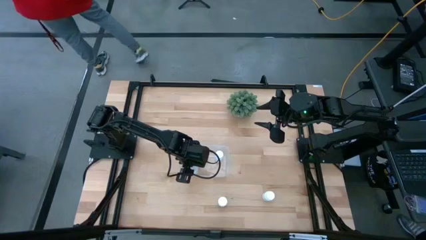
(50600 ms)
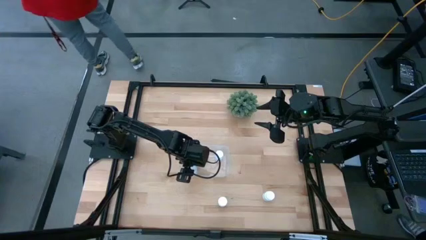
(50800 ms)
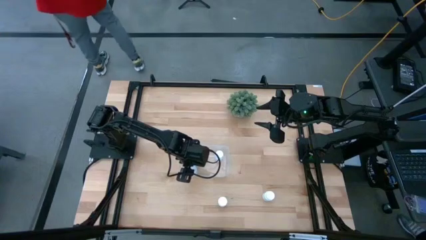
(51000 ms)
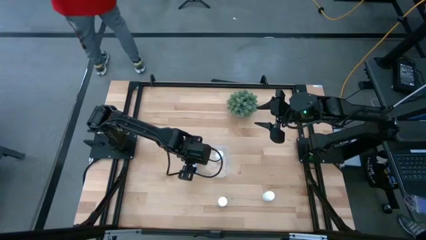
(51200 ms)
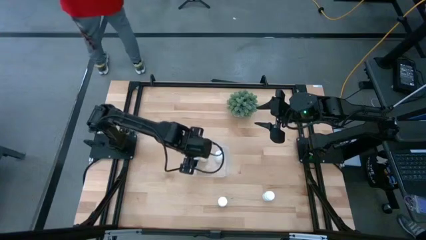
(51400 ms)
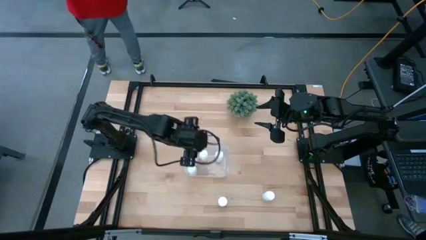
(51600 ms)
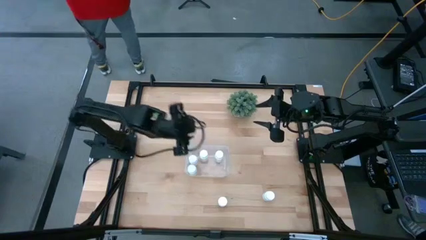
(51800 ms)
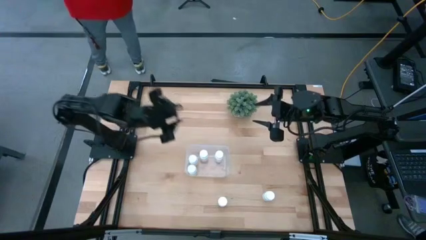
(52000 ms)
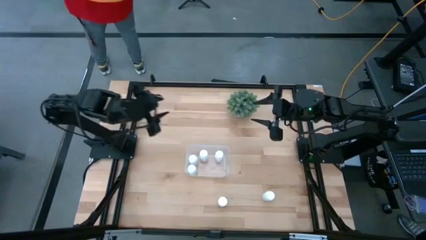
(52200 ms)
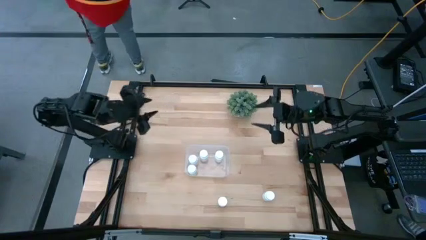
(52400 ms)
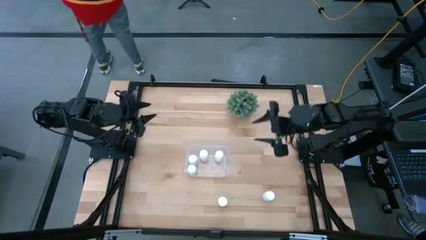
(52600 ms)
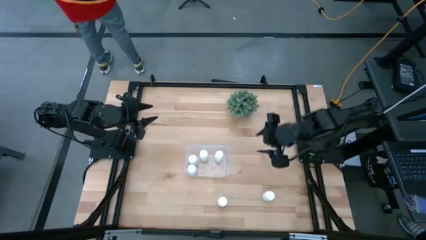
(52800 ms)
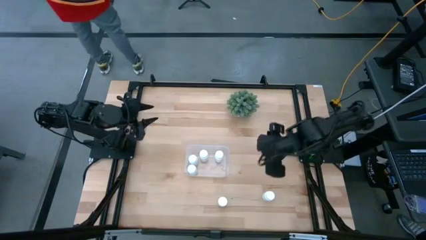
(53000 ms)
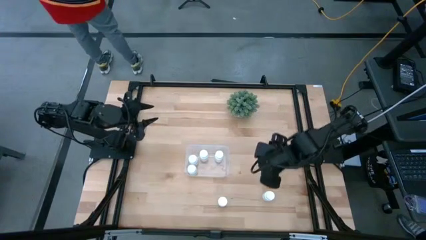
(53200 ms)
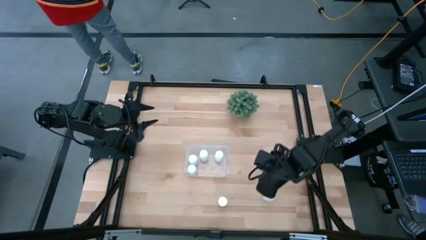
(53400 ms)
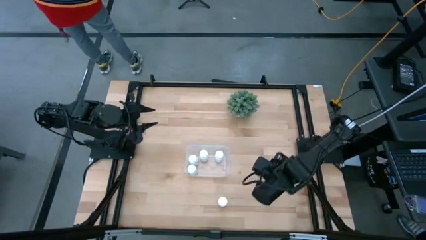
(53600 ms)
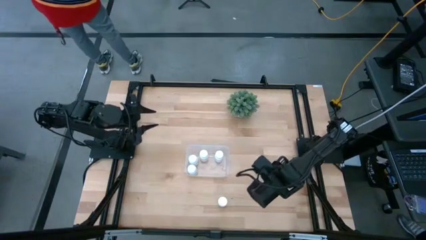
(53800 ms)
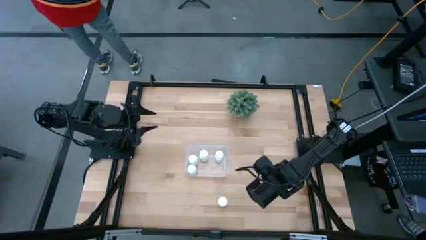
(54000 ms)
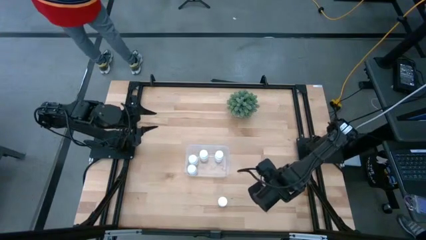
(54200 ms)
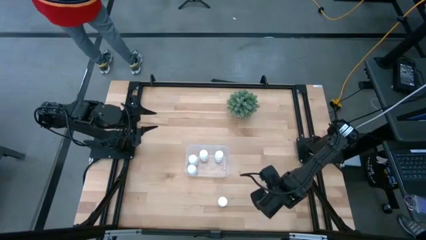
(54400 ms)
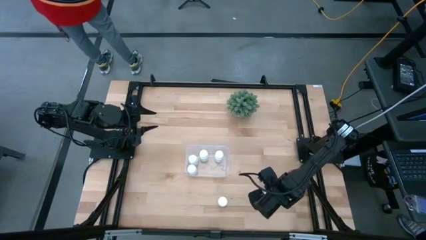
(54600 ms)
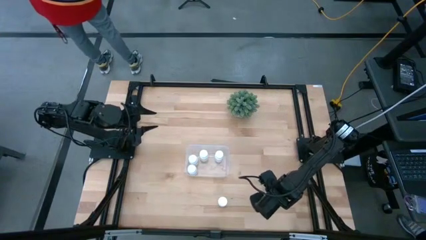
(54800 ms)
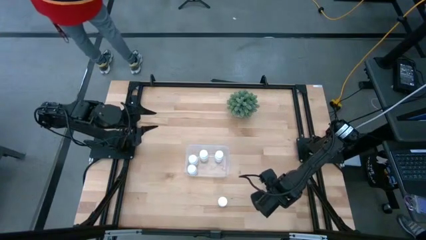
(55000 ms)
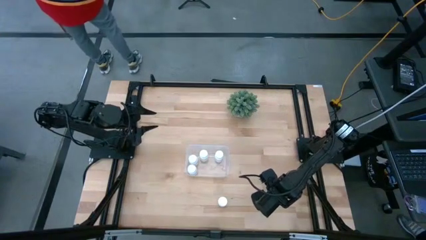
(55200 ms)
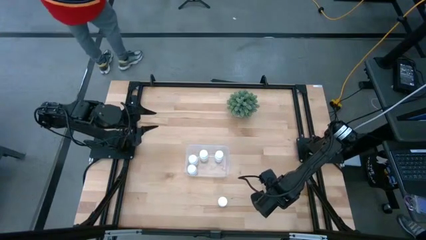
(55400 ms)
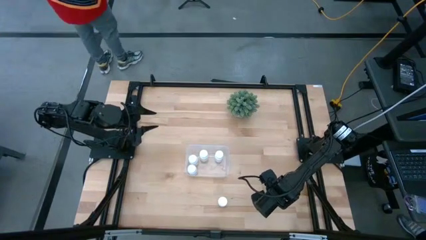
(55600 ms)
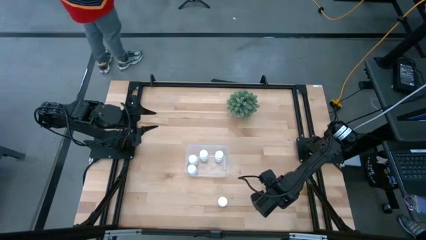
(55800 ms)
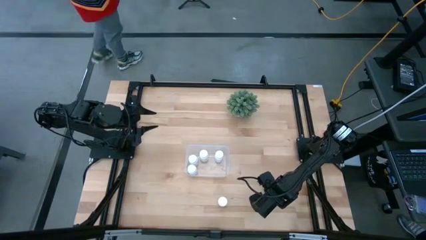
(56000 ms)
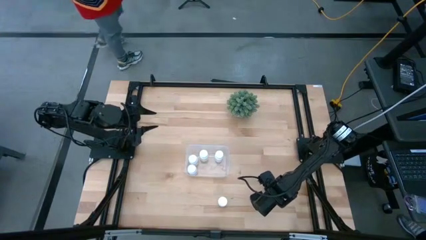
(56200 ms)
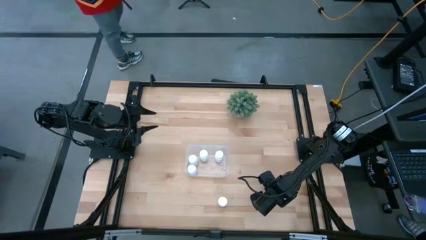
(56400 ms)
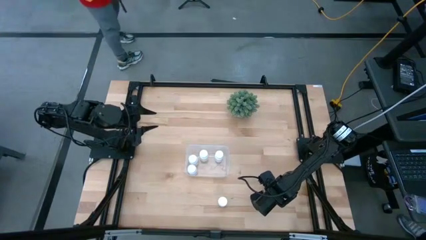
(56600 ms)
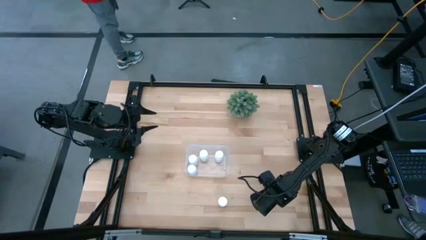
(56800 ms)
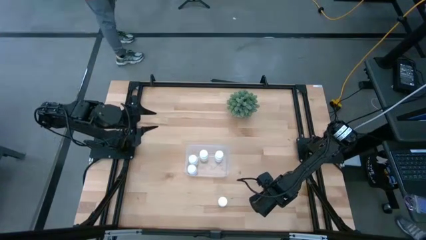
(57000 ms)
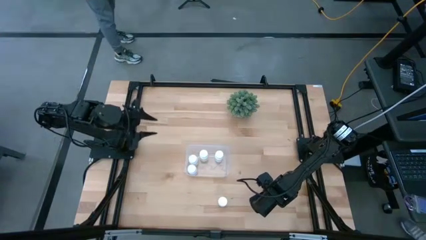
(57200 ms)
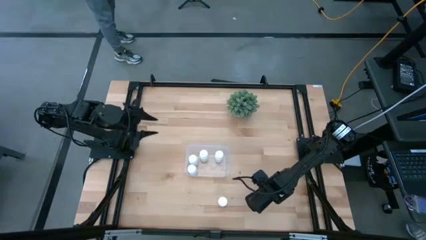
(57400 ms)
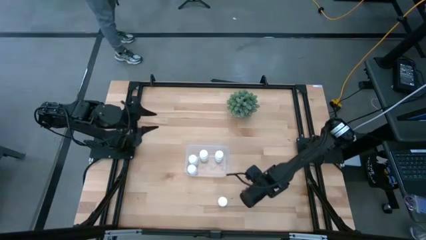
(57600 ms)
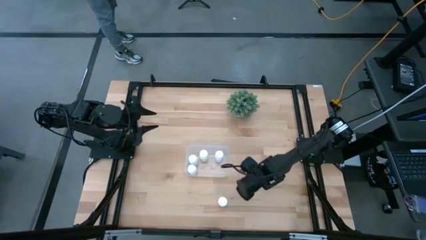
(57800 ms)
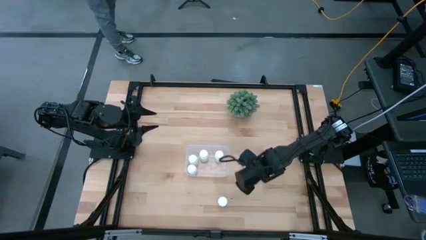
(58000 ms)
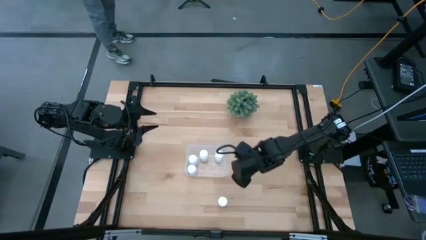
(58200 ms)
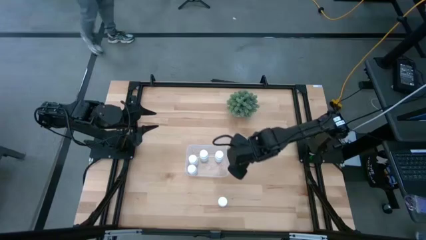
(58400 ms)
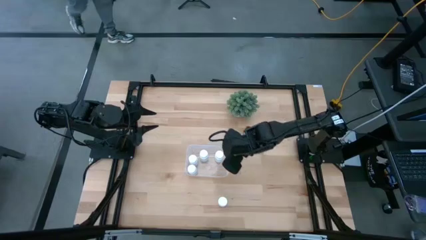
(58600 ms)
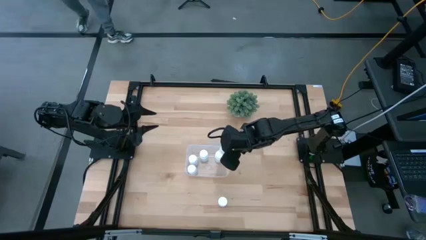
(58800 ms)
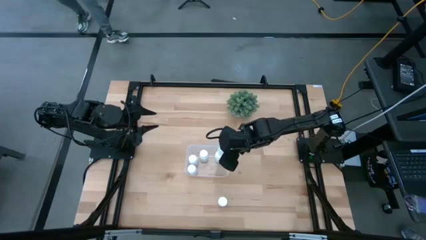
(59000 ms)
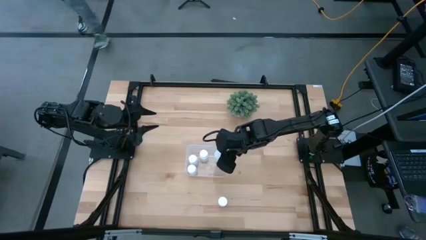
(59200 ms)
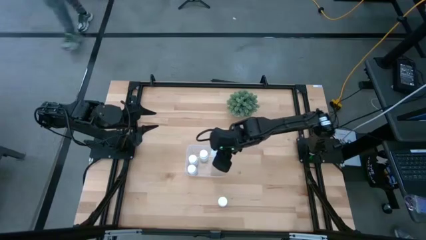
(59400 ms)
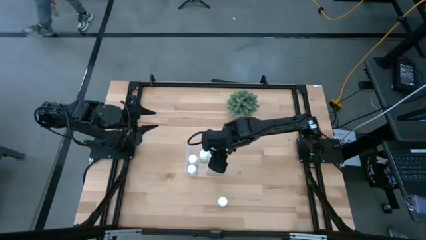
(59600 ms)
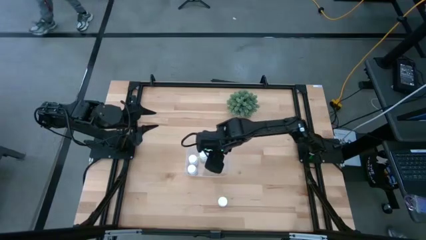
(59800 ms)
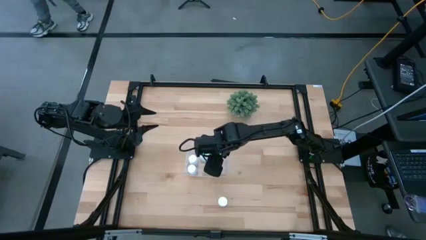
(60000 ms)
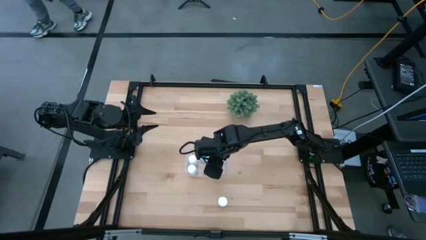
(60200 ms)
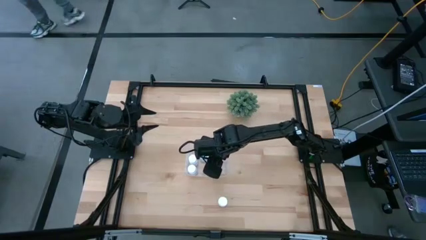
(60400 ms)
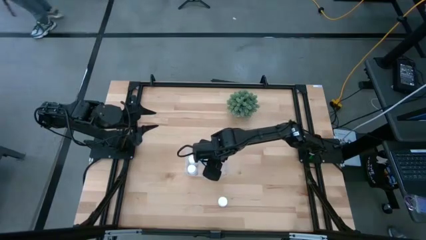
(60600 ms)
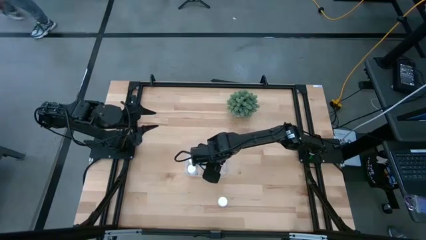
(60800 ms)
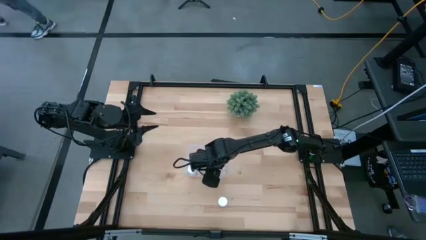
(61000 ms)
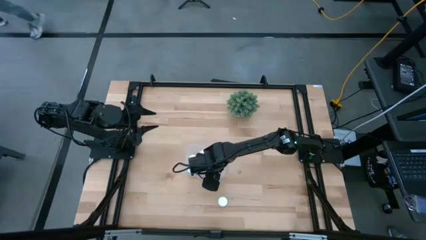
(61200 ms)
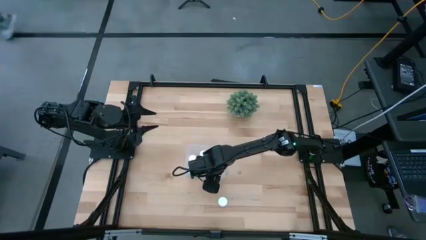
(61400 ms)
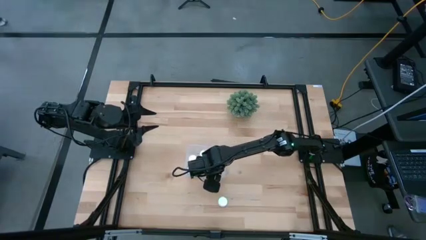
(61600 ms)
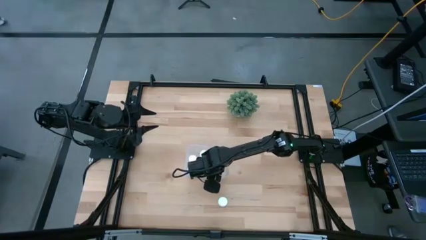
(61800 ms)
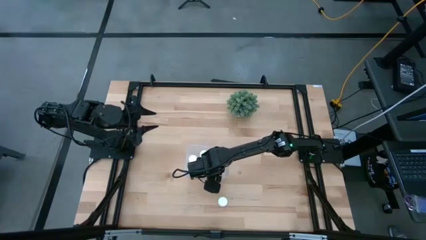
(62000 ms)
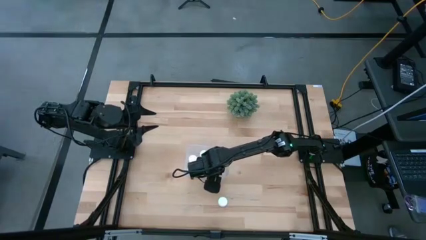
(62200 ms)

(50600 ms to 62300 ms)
Task: Pick and place pill bottles into a basket
Put the white medicine bottle into the transparent bin

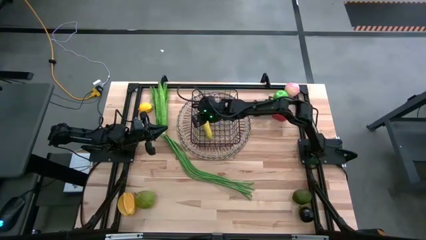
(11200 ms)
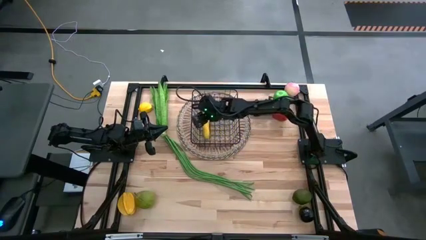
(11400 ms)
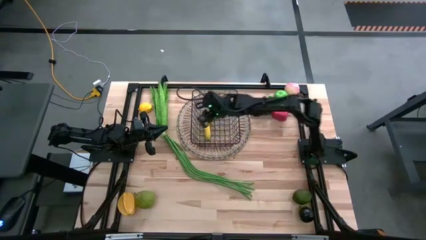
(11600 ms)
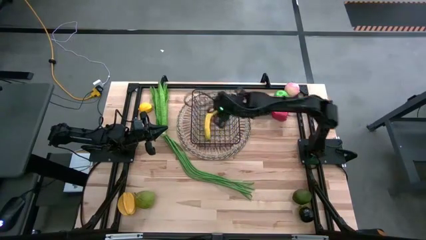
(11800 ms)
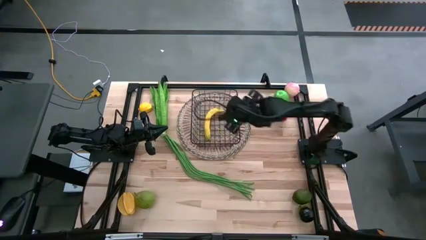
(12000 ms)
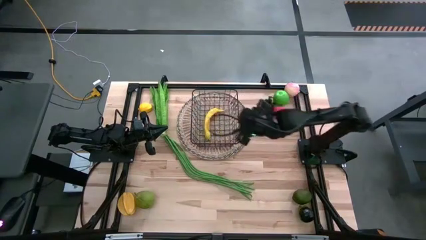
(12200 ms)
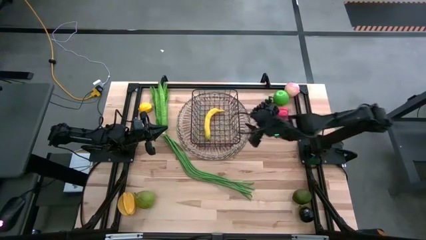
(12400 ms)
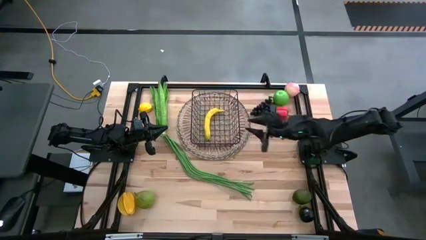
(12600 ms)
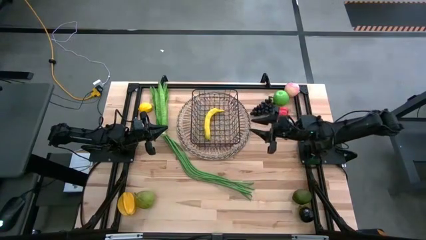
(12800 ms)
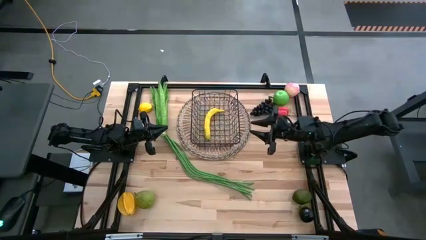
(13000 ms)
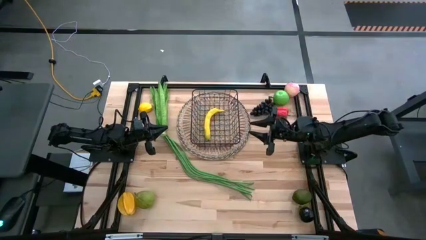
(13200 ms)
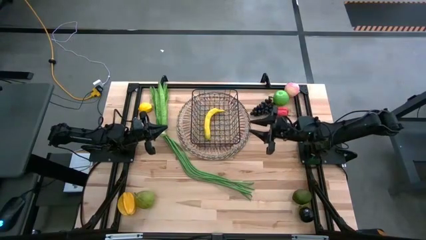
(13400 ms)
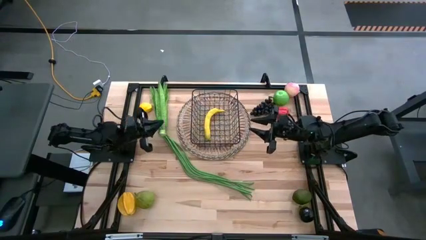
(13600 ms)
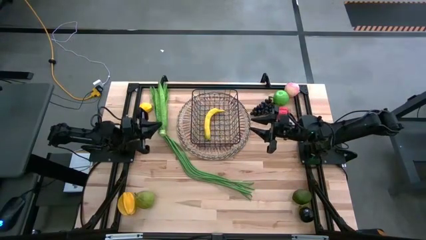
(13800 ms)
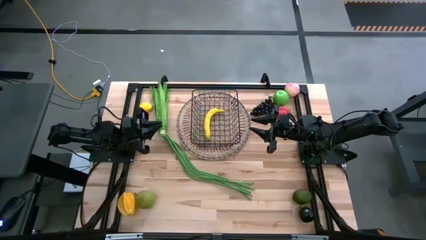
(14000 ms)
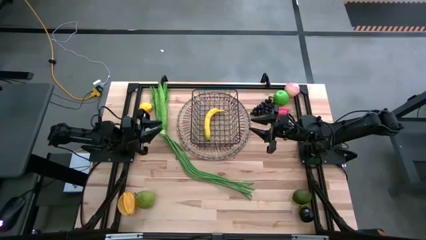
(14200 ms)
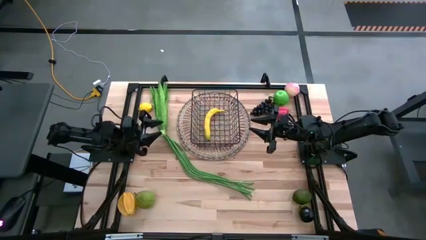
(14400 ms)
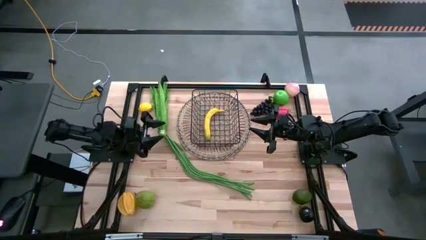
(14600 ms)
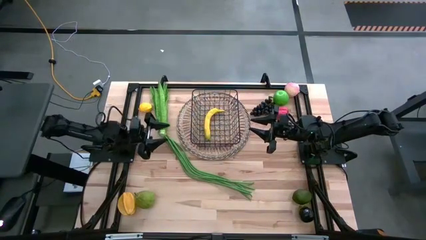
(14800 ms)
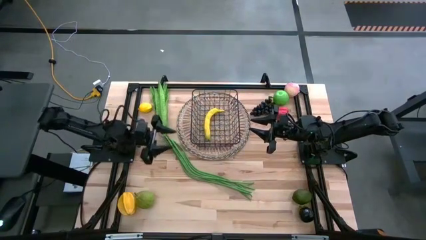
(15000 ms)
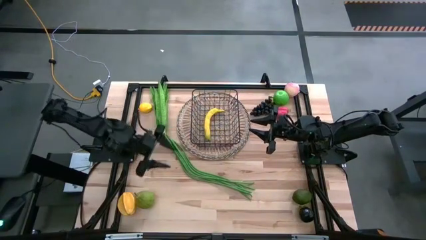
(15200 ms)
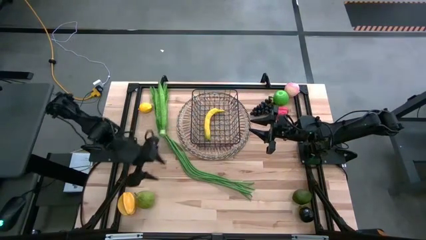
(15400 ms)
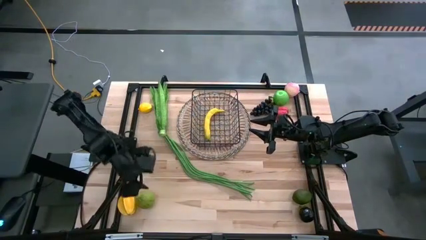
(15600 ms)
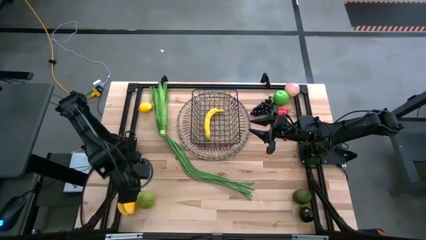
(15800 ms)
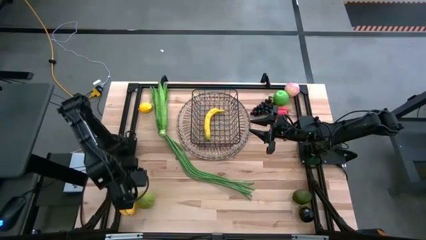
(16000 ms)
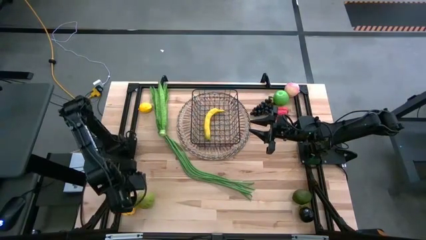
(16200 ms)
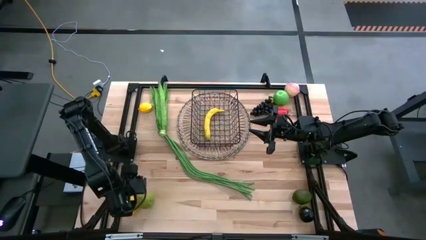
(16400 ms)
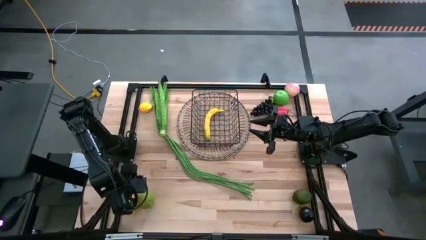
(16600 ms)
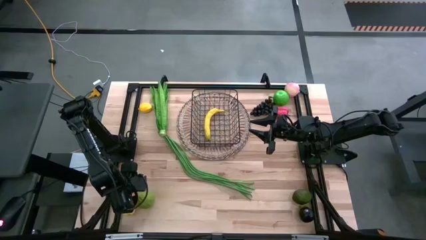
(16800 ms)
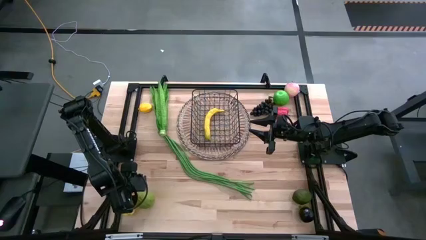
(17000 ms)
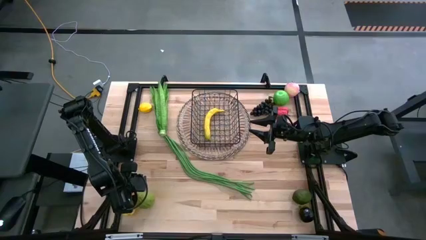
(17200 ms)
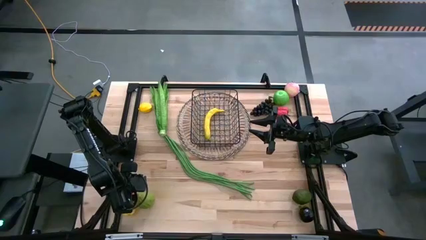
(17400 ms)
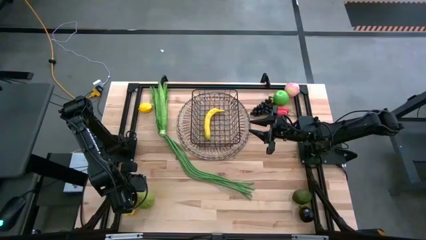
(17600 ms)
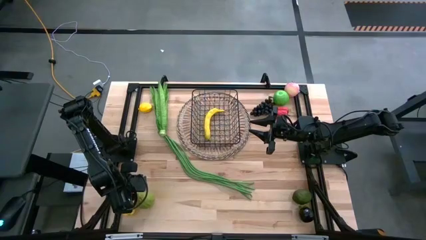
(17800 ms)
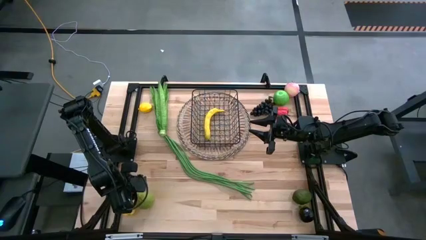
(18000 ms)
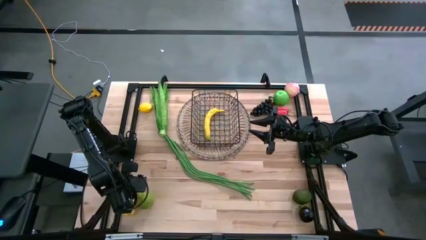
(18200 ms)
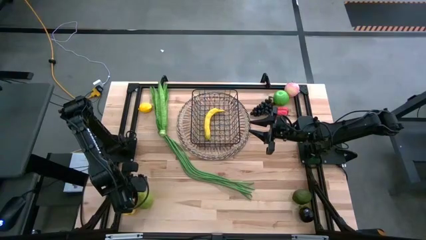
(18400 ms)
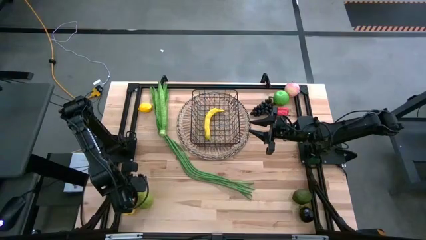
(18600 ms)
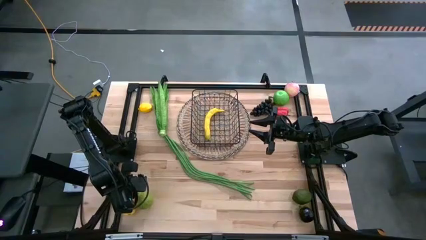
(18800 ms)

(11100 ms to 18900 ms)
Task: Build produce basket
Put the green pear into the black mesh basket
